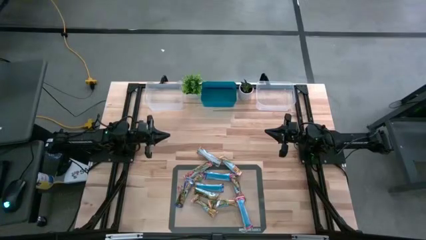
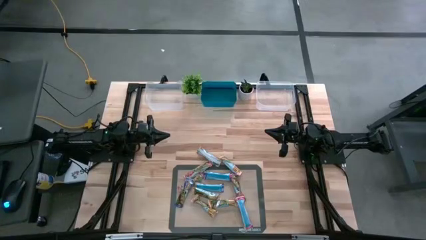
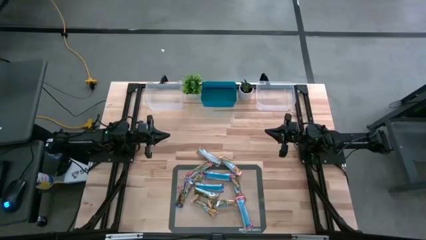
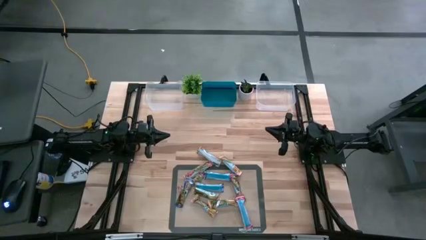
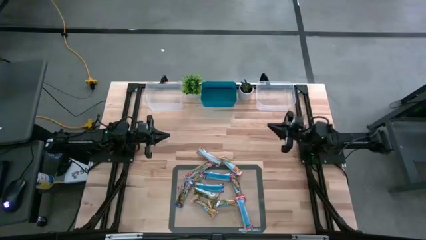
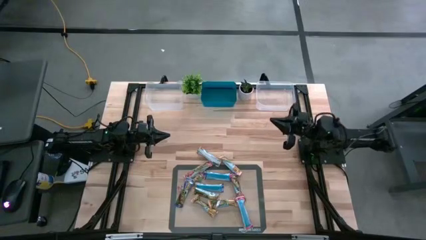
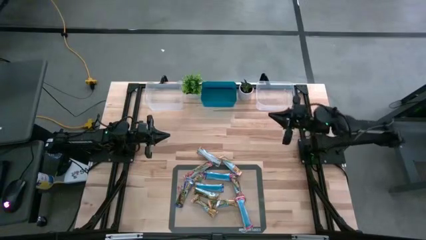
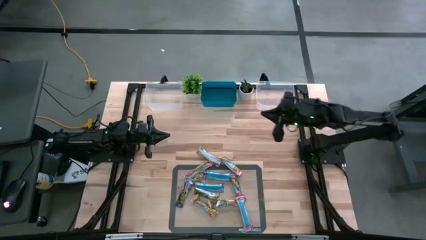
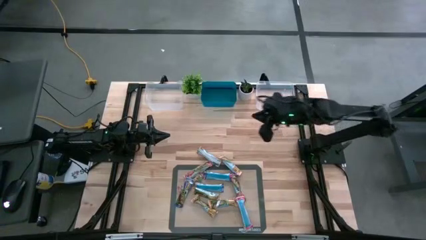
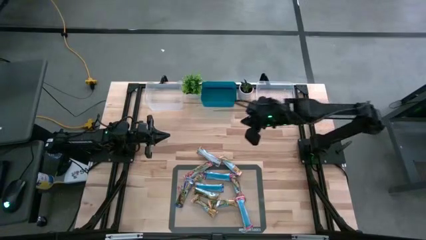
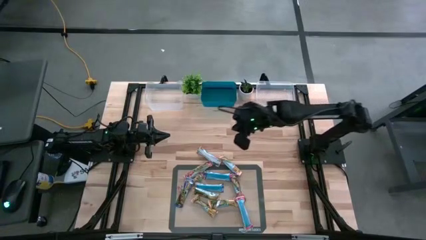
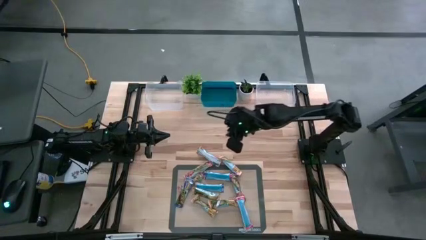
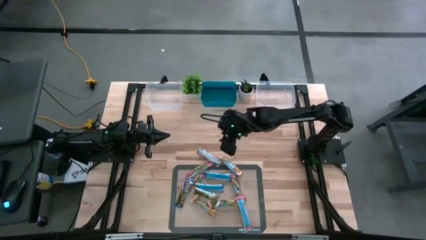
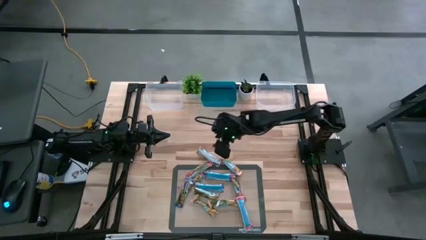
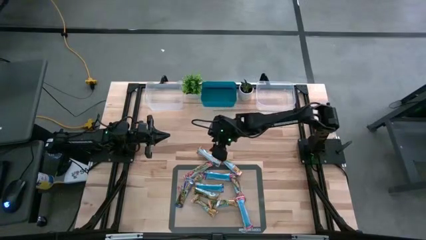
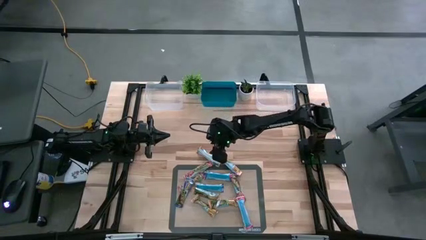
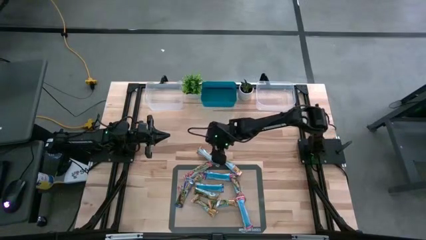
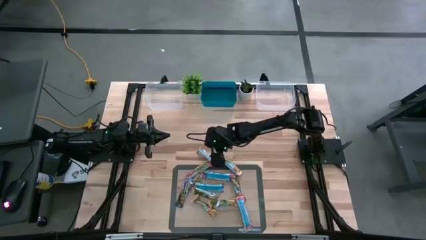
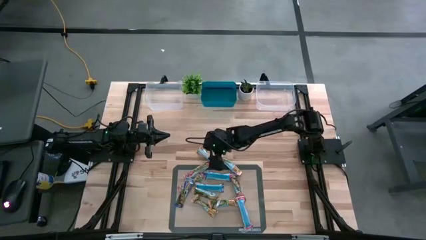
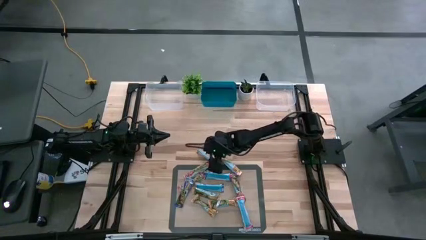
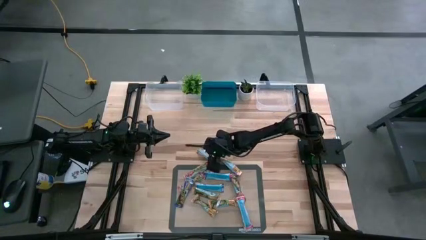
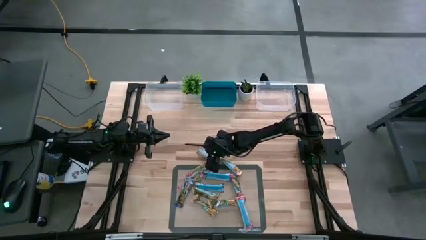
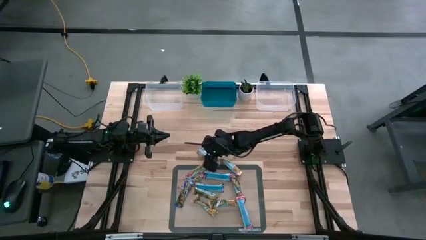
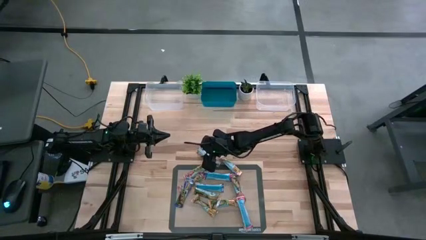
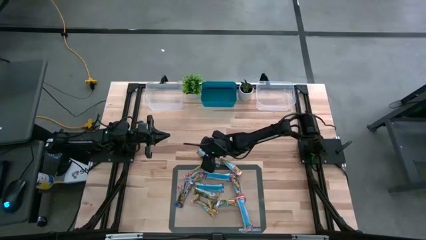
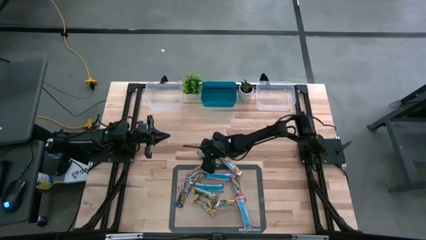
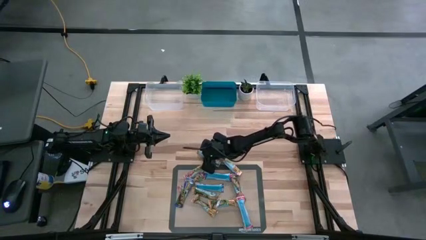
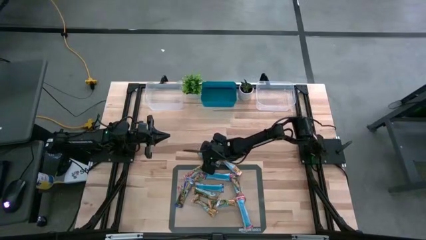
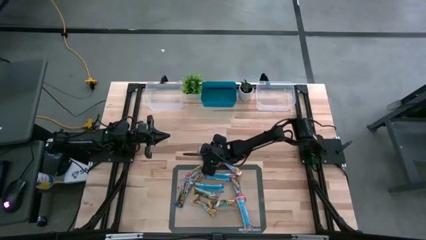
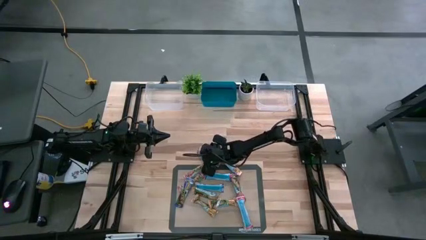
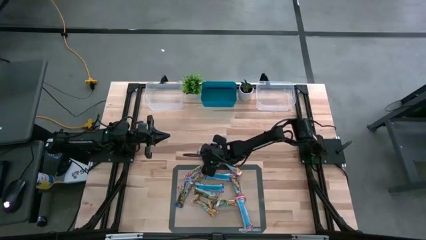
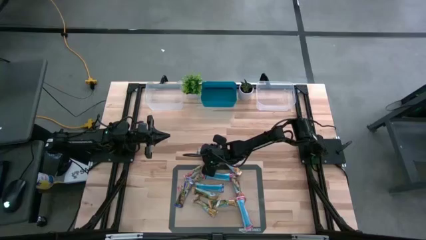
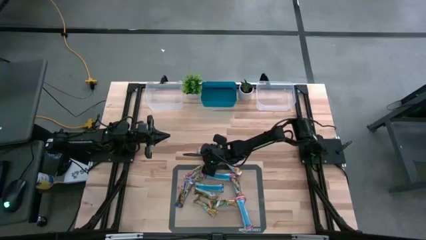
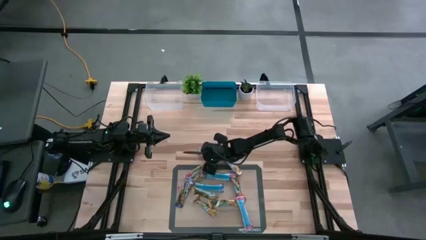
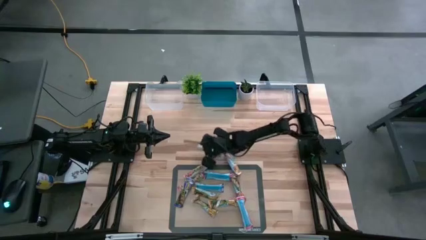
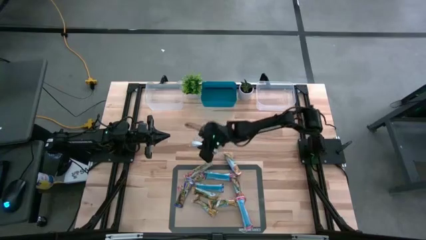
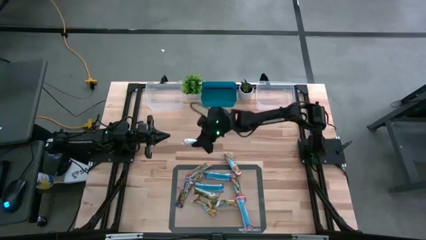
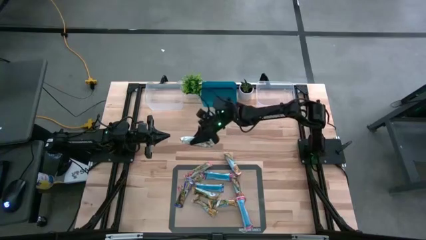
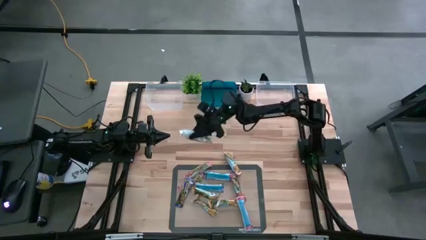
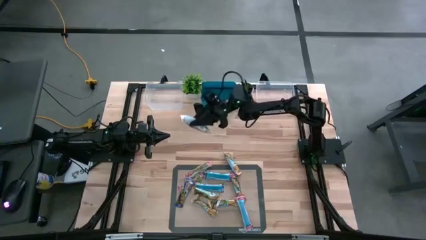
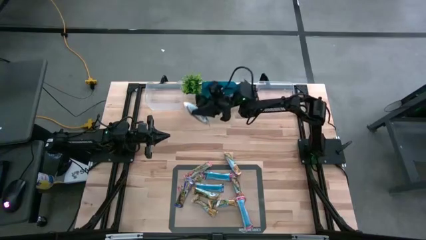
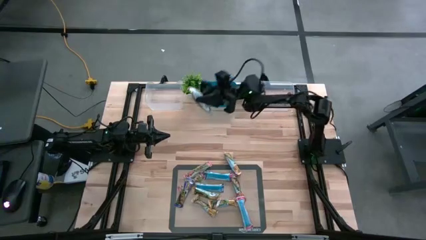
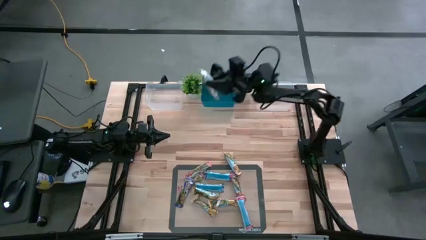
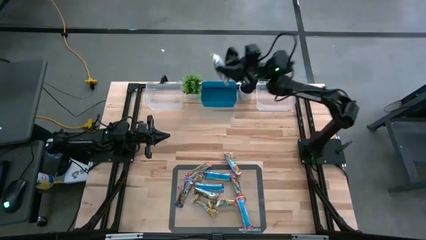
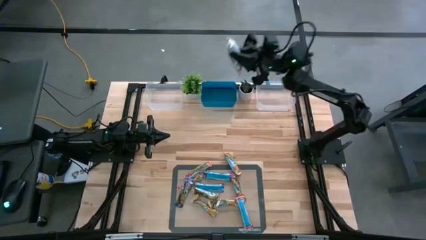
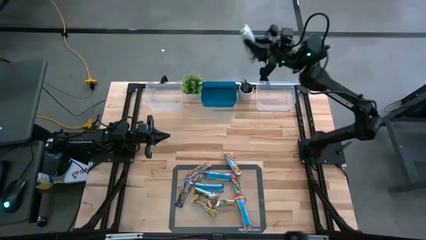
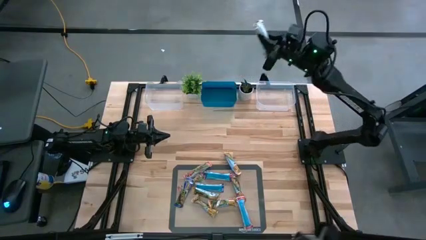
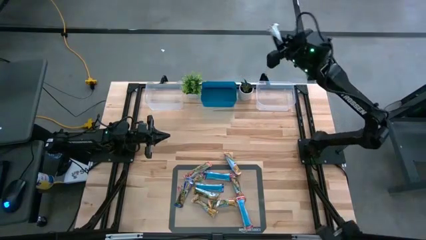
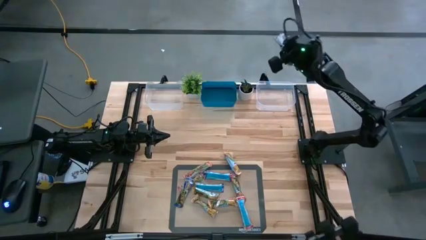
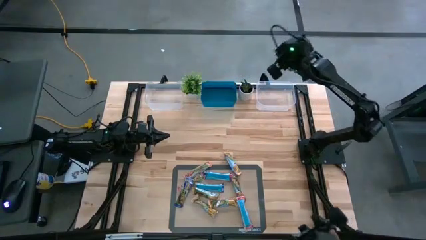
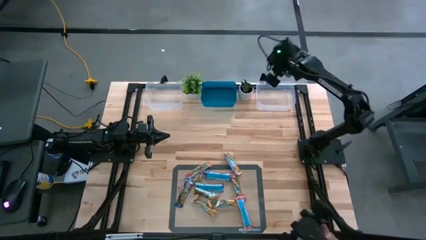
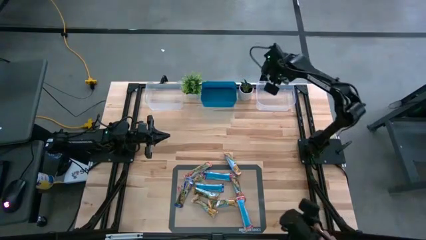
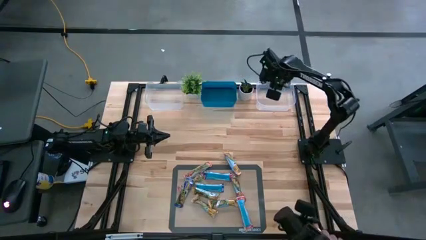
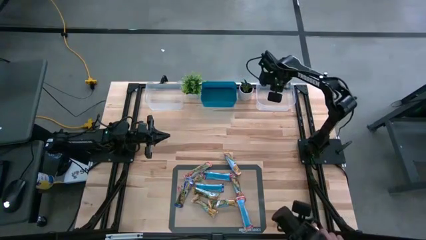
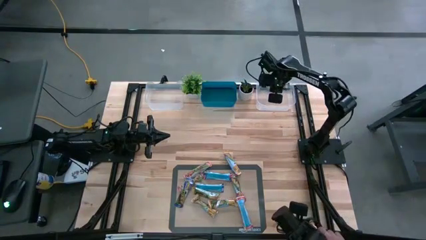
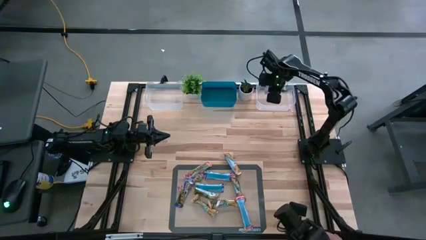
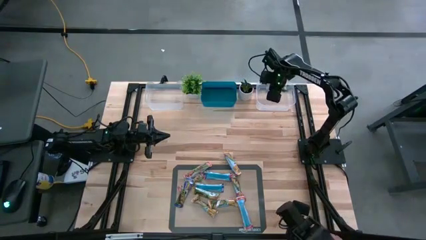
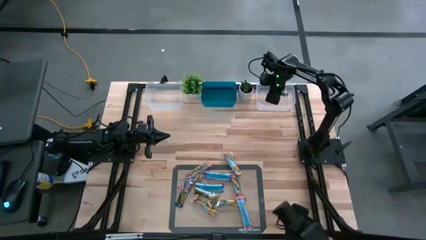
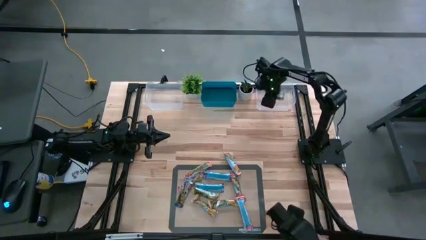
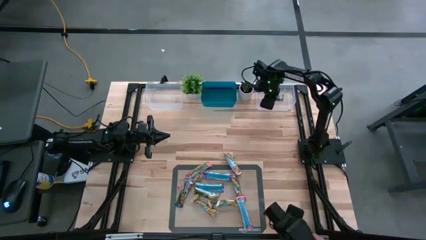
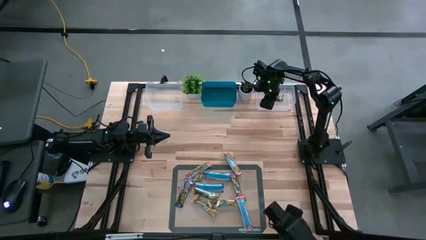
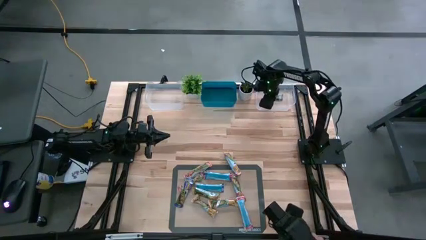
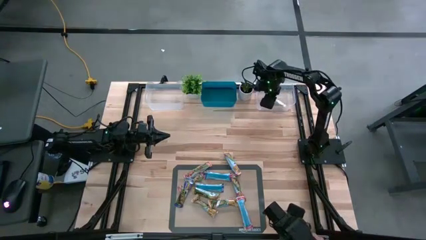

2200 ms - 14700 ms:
Task: Pick and place Granola Bars by type
Put the yellow granola bar into the right transparent bin

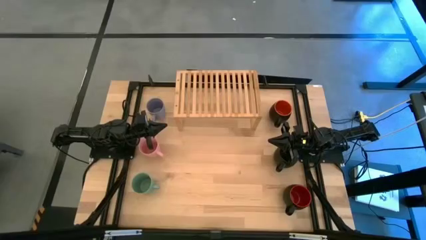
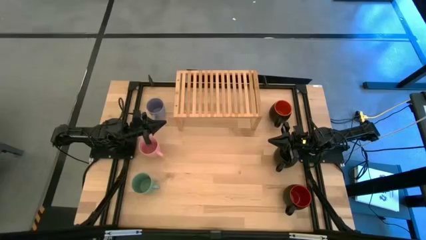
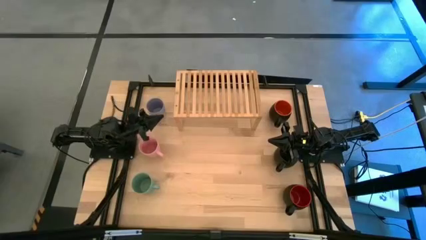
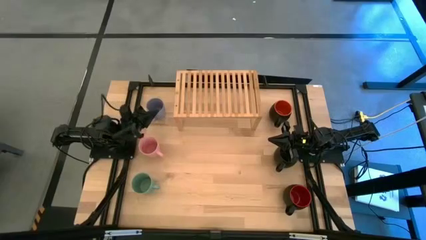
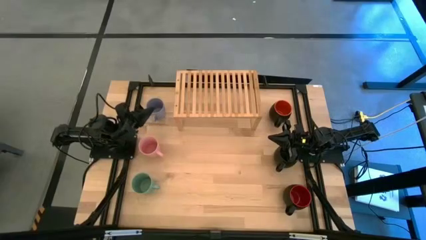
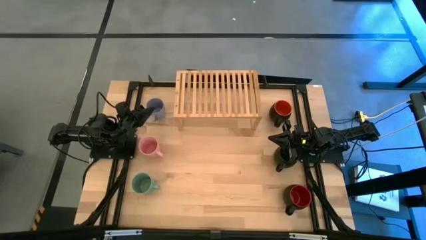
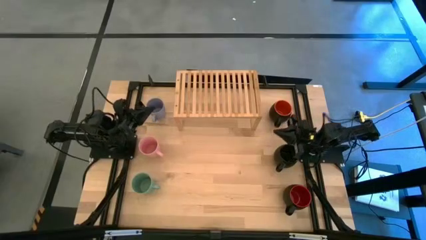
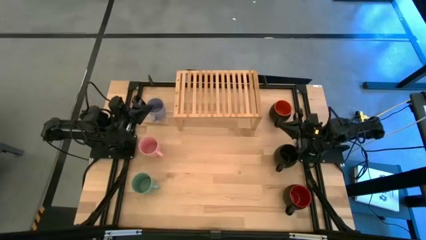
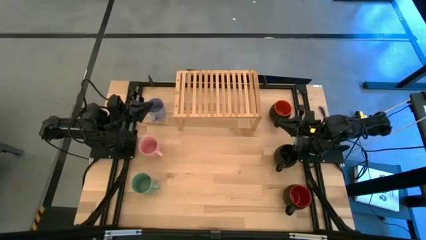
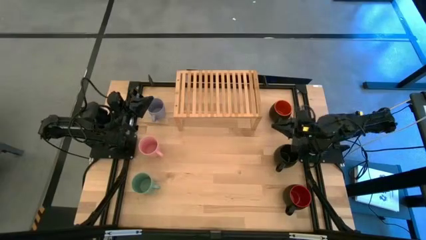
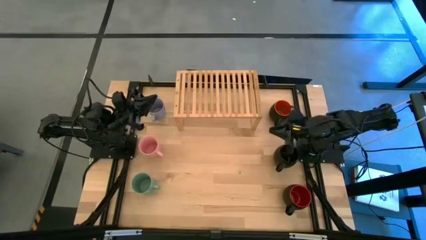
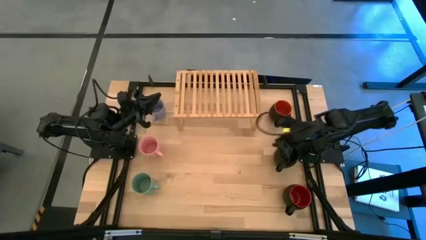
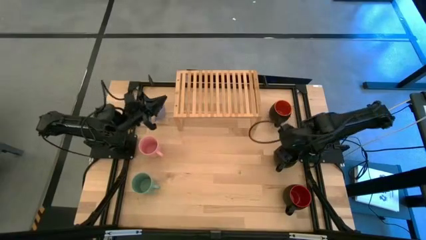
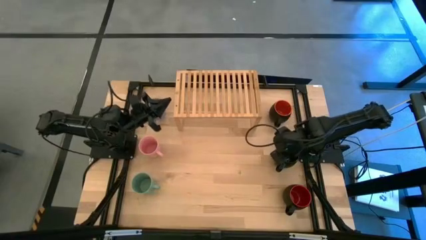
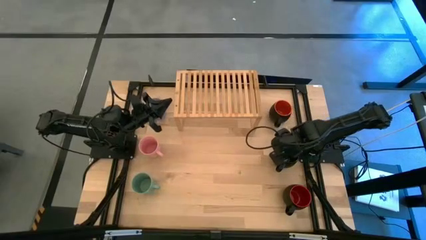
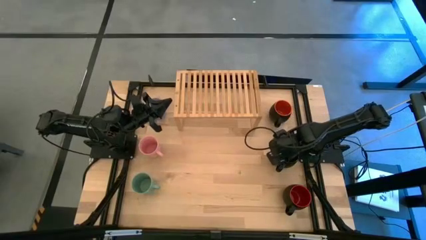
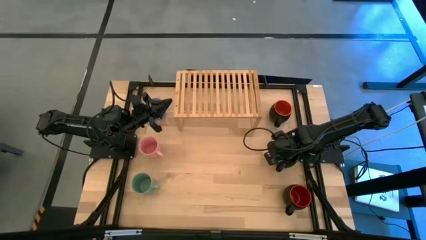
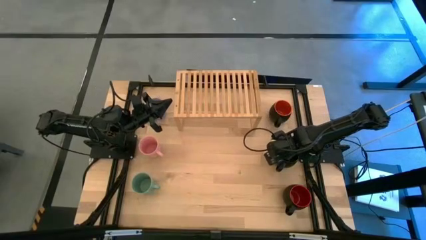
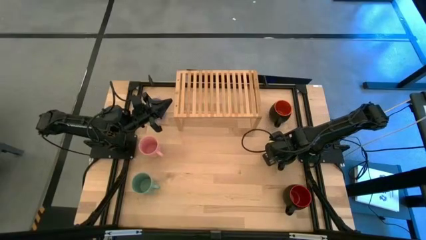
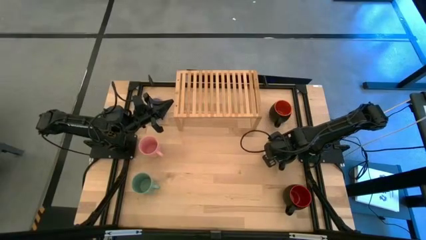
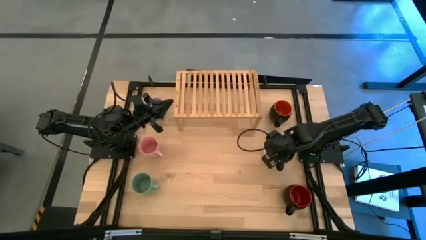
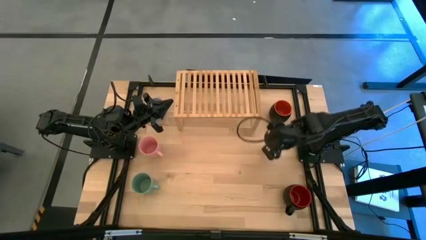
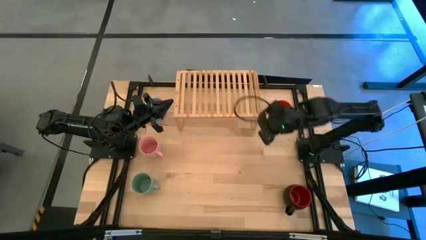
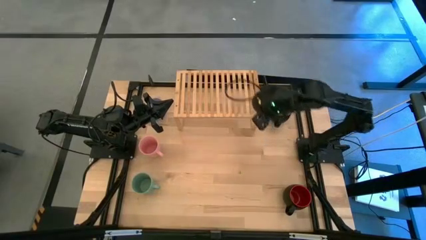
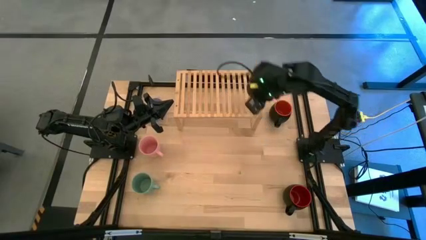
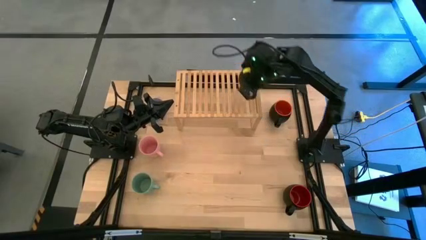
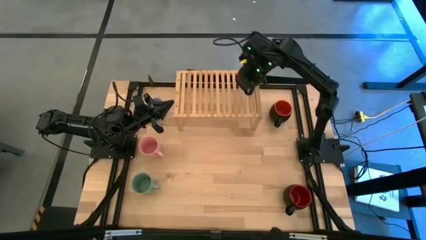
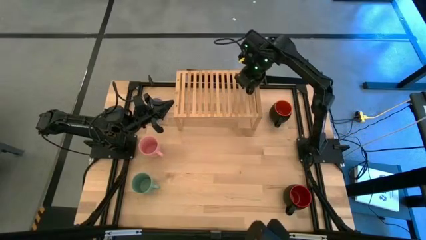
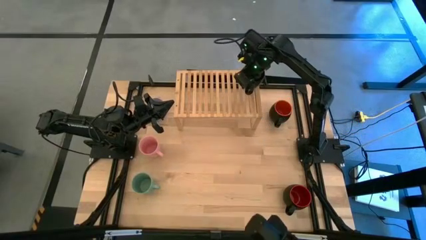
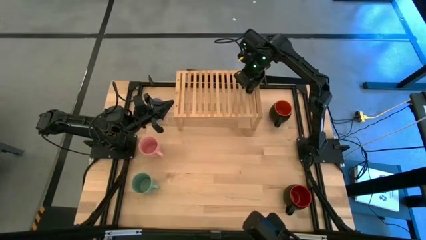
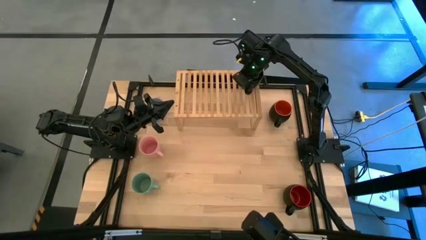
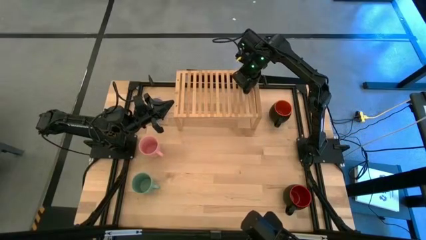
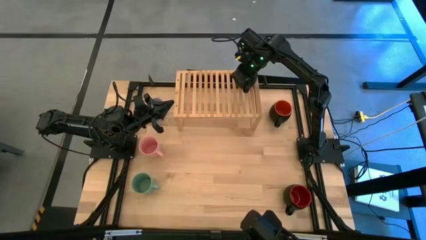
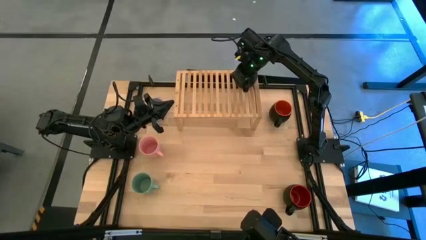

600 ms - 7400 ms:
Task: Place coffee mugs
Put the black mug on the shelf
